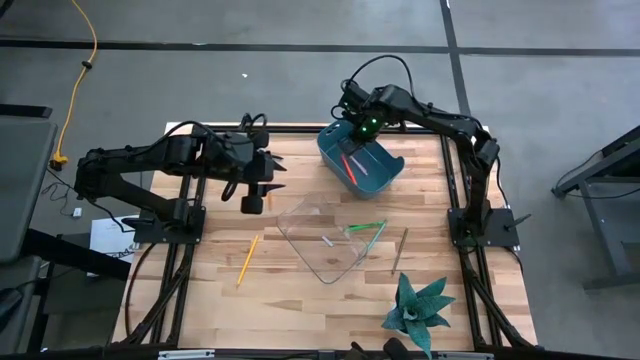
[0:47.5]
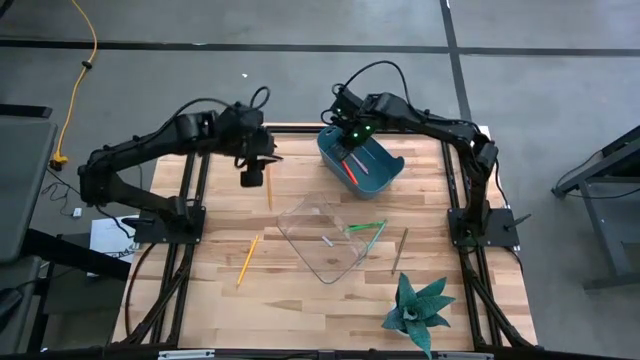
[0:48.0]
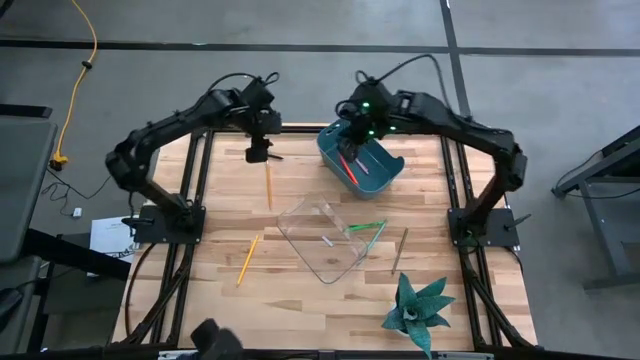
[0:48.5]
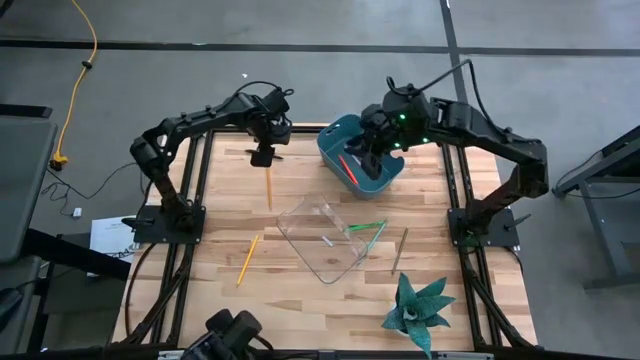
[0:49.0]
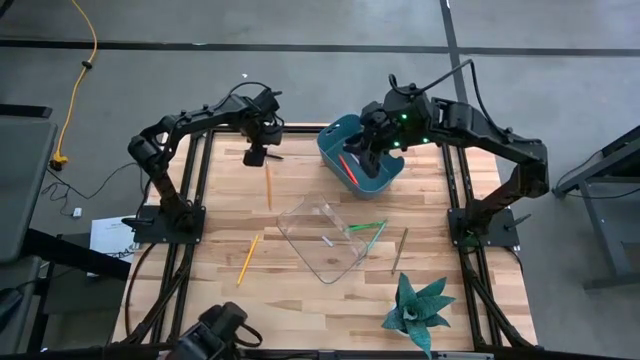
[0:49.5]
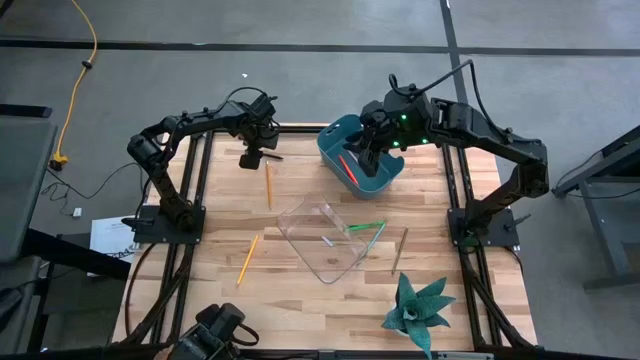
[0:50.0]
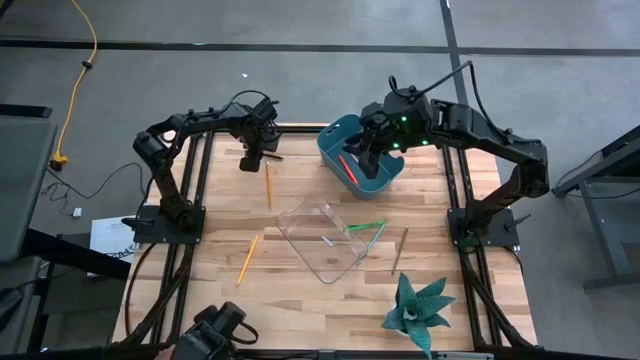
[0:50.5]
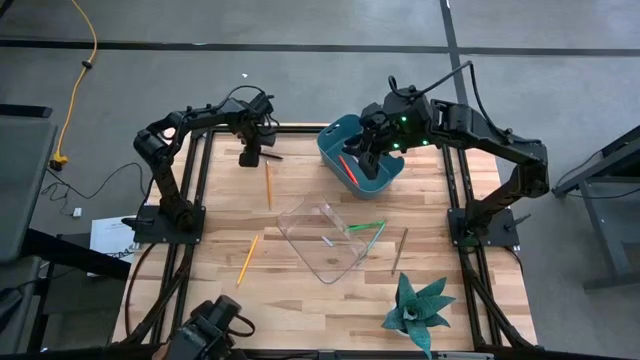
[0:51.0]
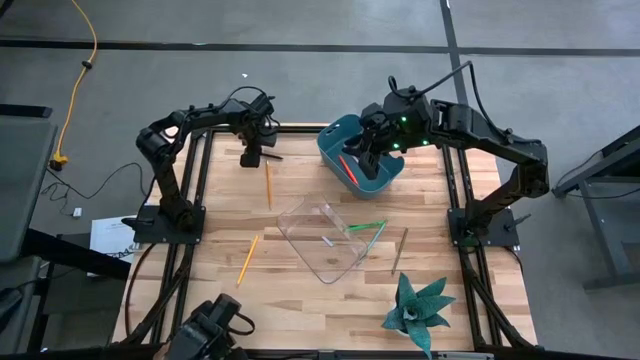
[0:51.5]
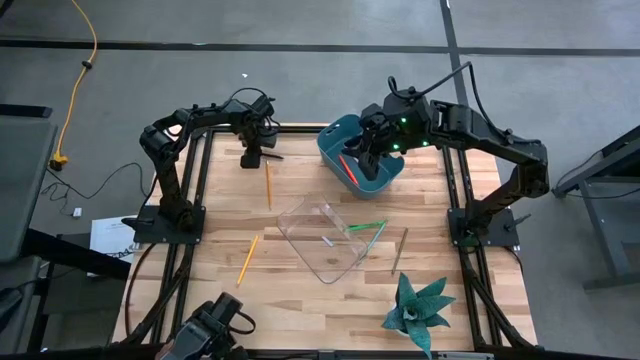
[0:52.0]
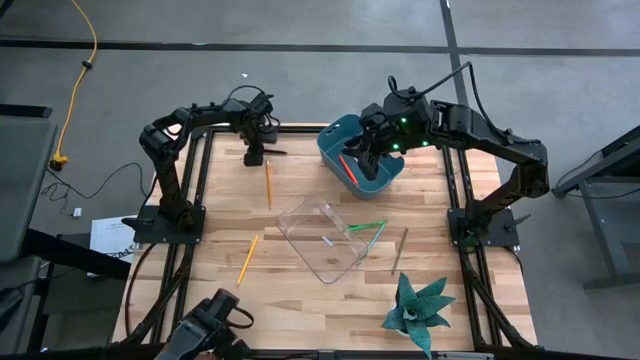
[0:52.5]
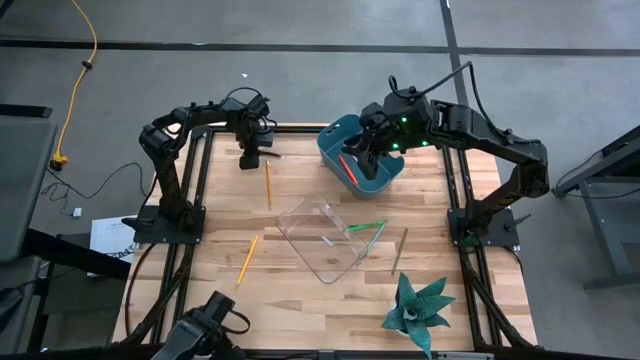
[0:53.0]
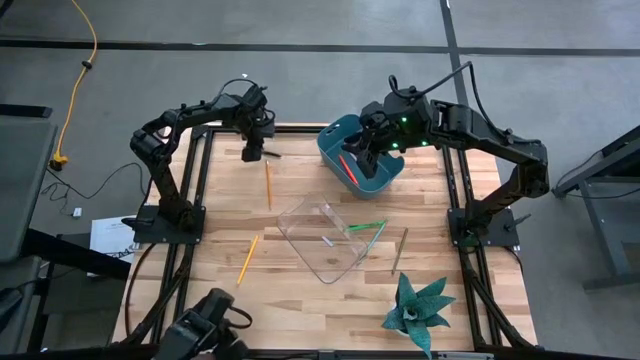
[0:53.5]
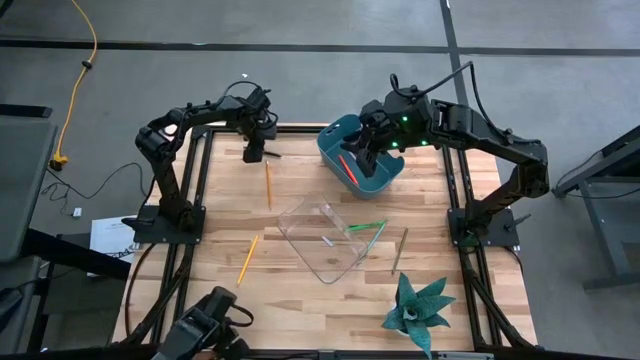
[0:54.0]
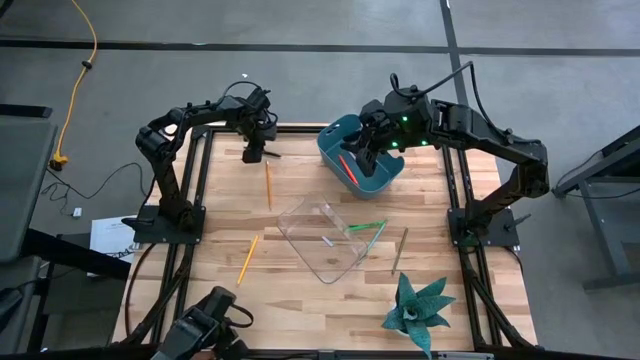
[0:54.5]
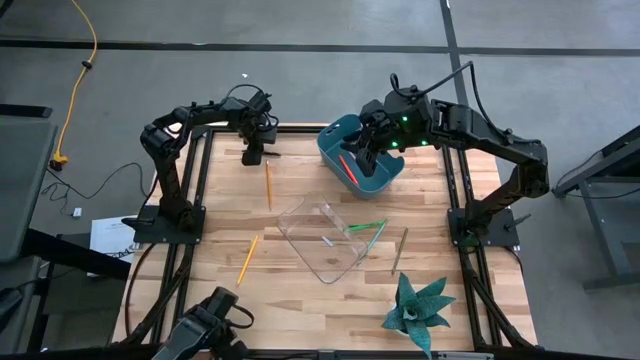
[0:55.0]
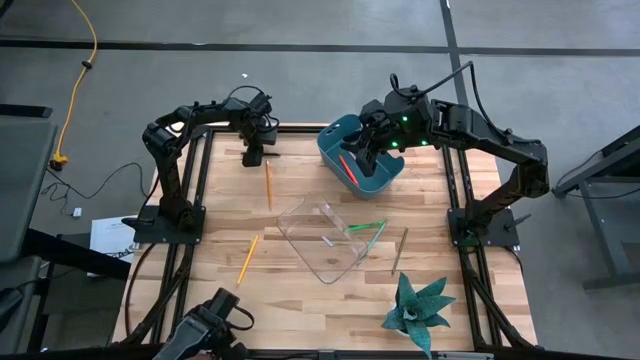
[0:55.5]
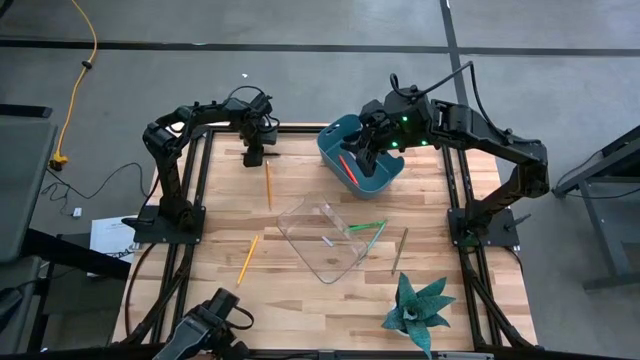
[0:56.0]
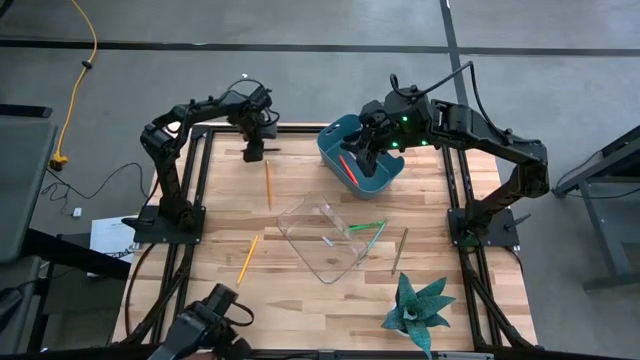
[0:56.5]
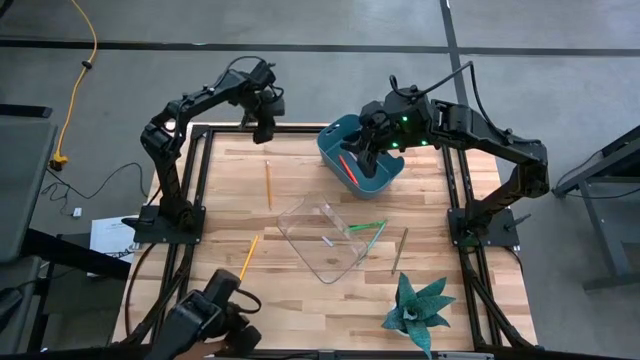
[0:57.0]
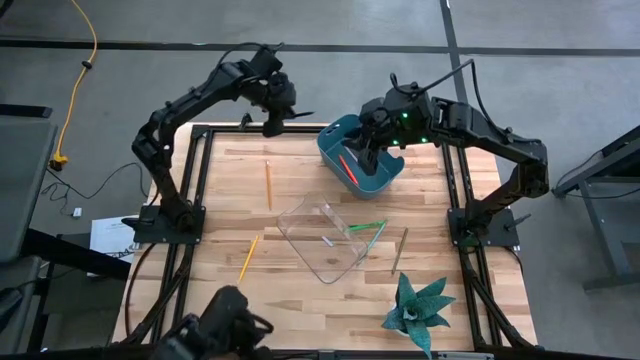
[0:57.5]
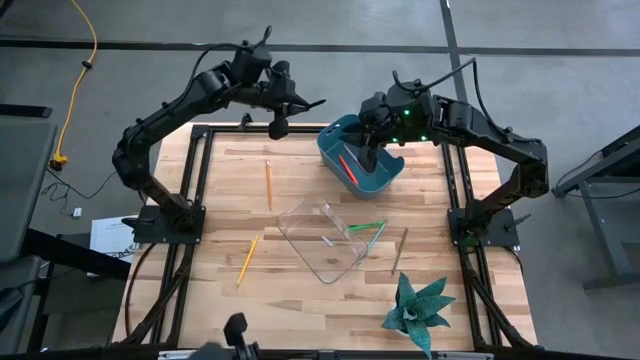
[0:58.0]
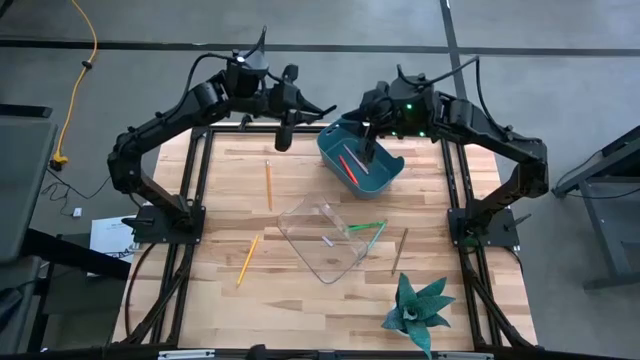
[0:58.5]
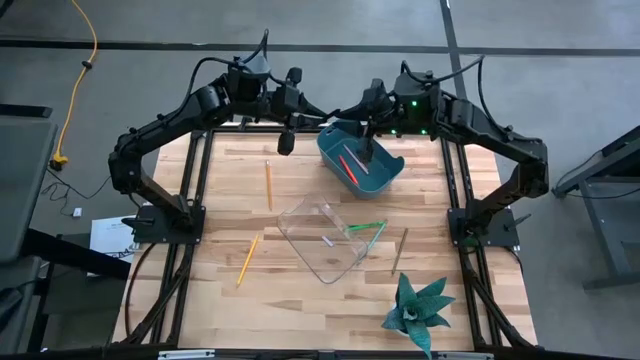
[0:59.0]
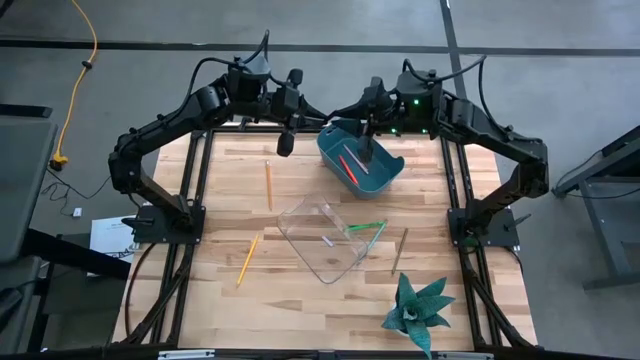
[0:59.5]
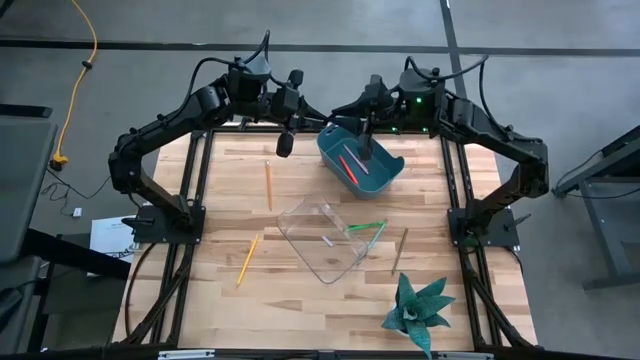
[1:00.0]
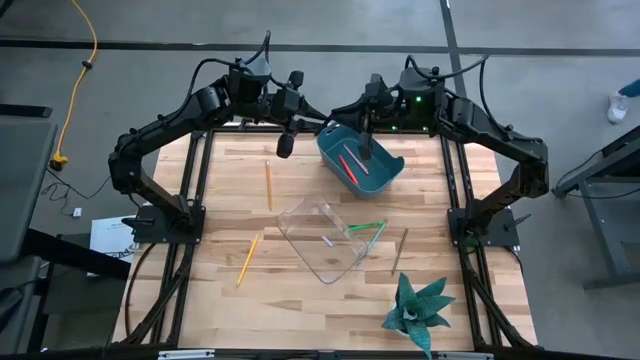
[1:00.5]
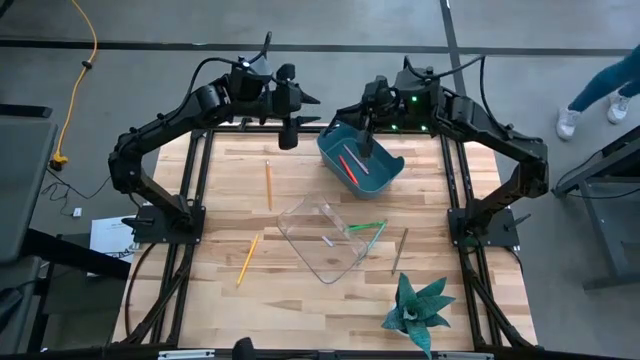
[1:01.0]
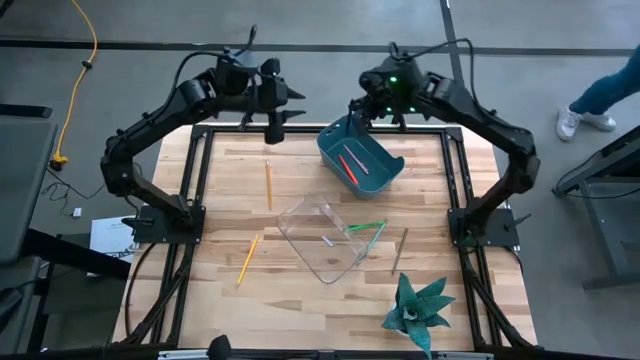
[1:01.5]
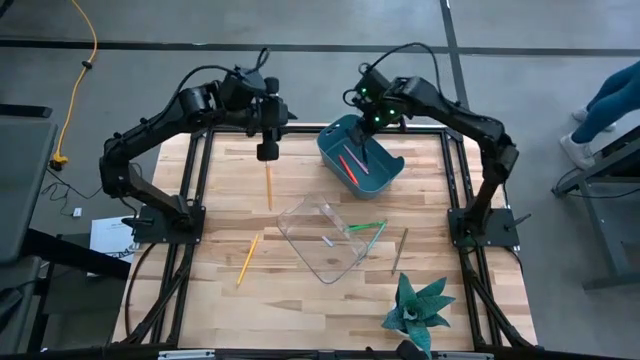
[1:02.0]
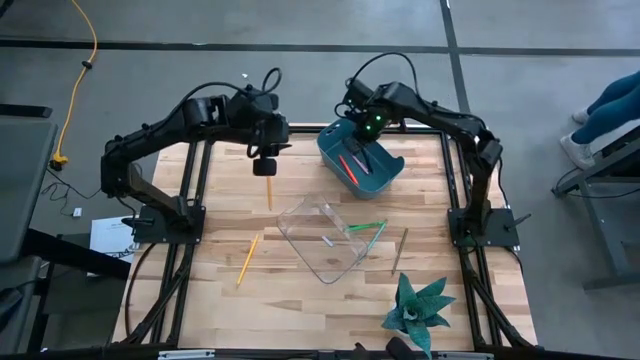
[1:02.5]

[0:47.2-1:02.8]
Task: Sort pens & pencils
Put the black pen into the blue bin

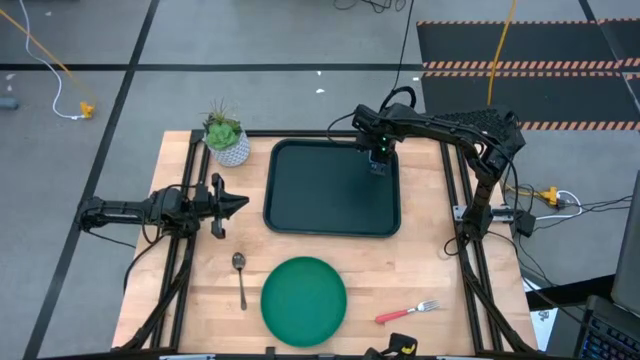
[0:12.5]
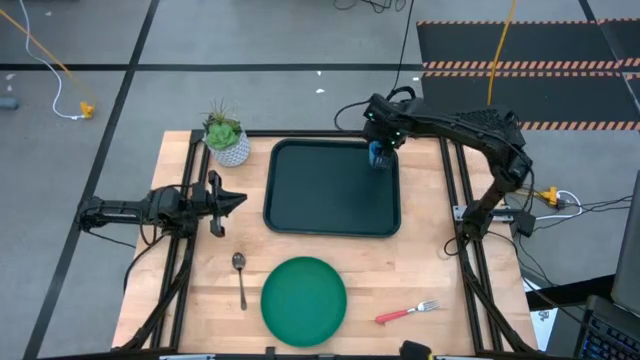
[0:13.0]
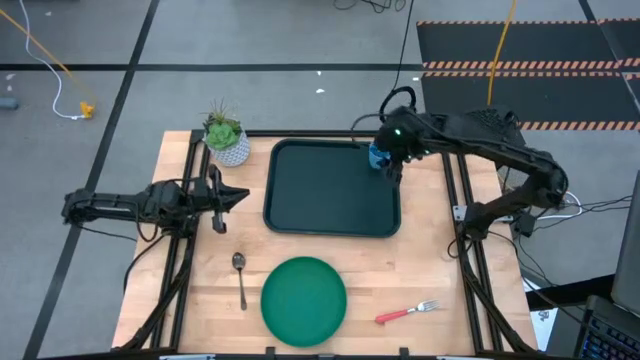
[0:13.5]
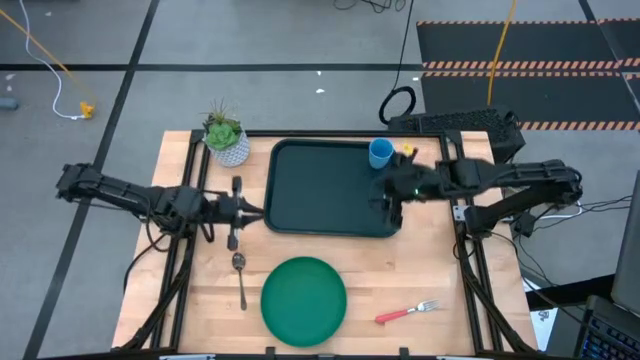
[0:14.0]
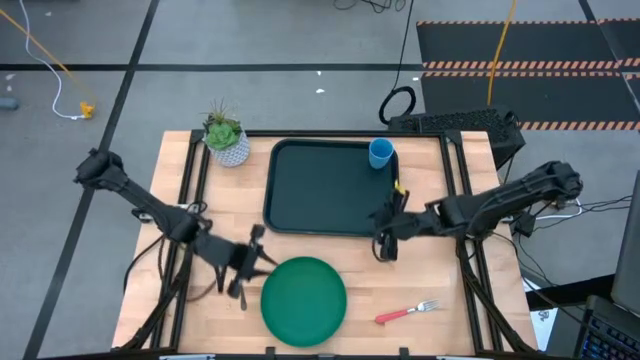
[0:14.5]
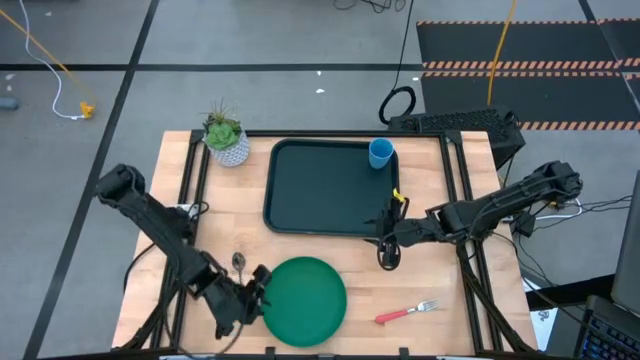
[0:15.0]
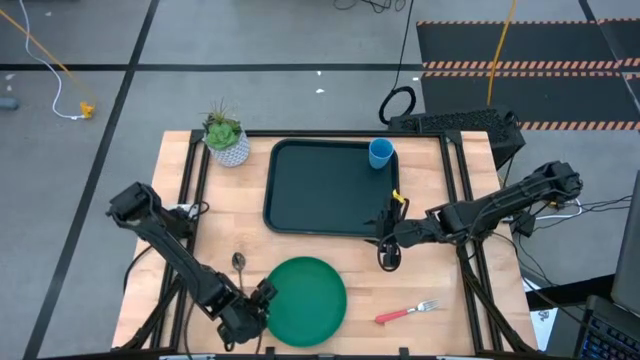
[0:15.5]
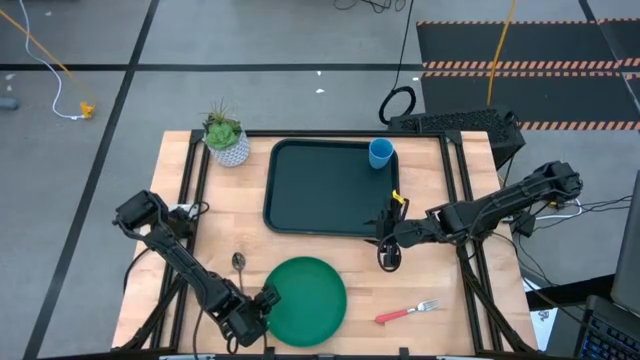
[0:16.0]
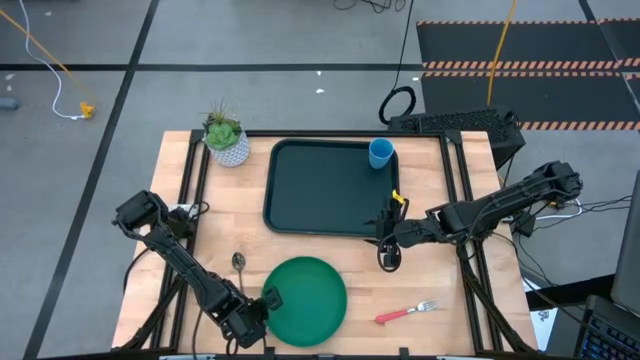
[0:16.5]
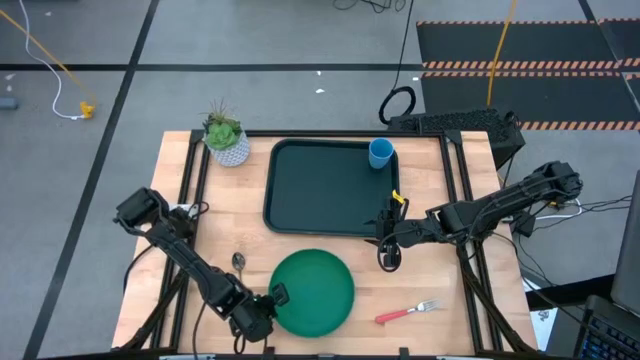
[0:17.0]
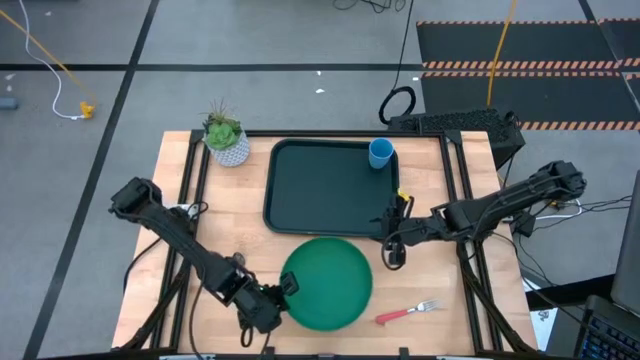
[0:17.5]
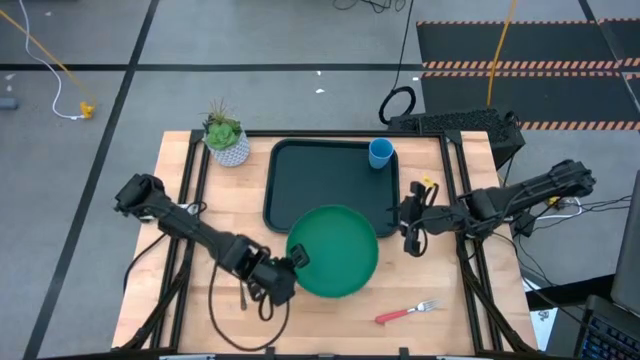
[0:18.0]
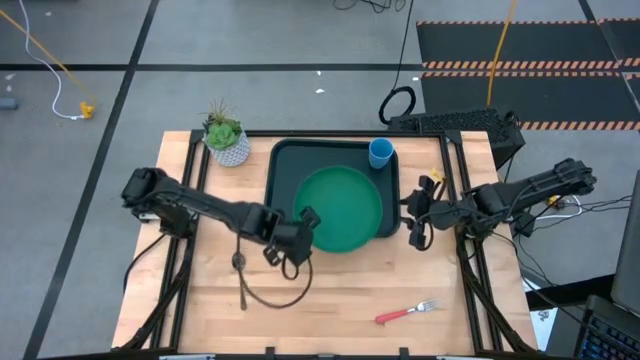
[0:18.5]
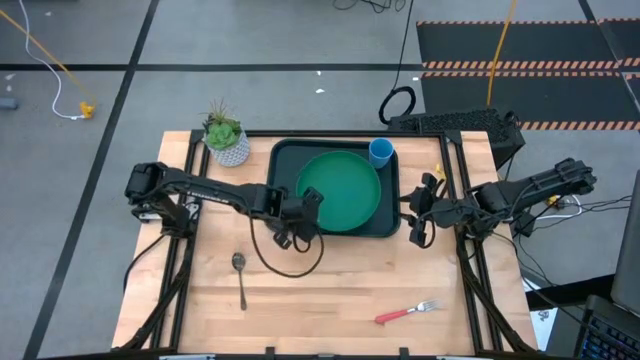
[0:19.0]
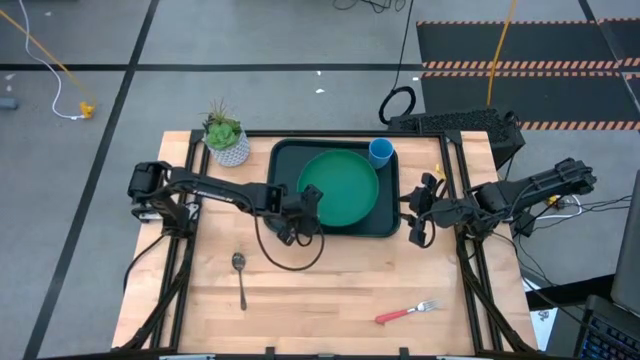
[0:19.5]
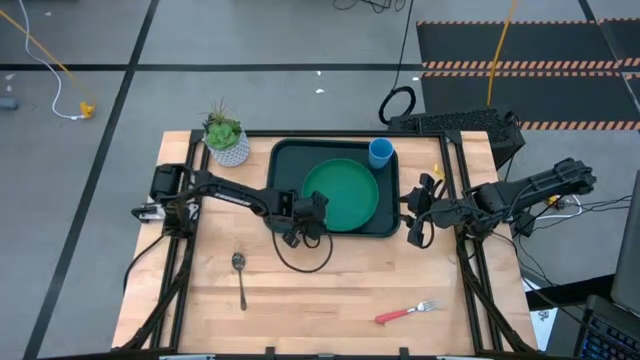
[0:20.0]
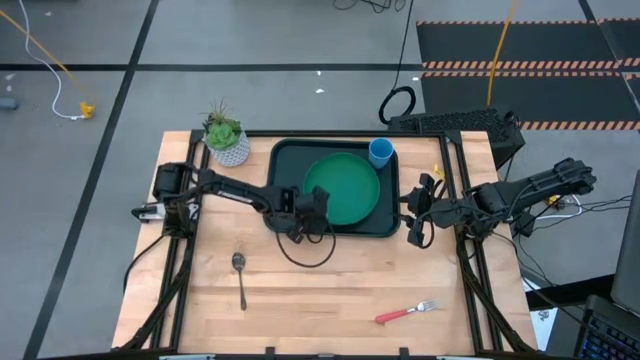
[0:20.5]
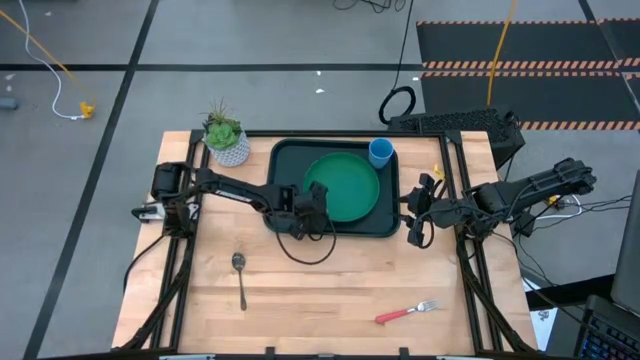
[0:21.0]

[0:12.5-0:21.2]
Task: Pick and place plate/cup/fork/spoon on tray
Put the green plate on the black tray
